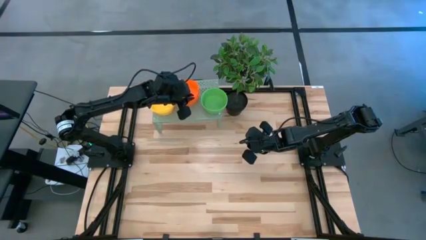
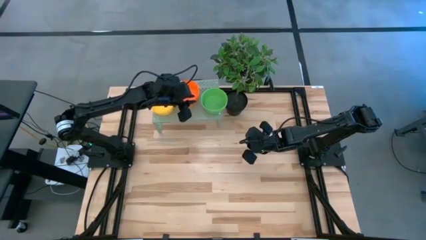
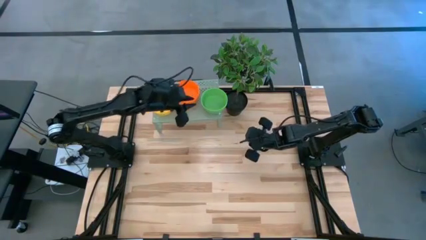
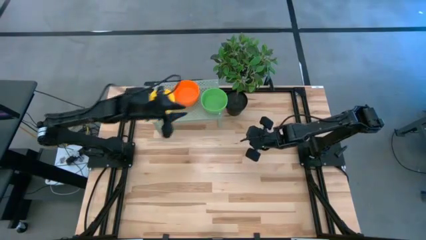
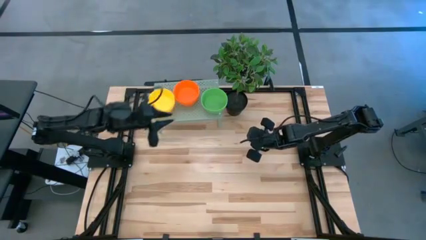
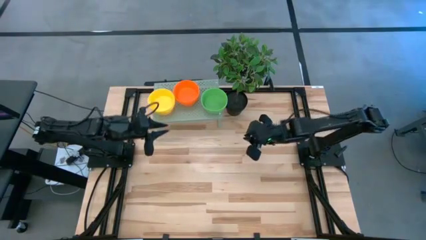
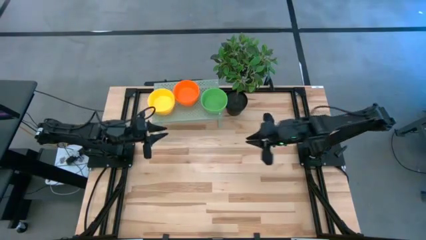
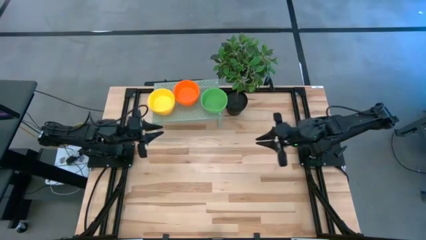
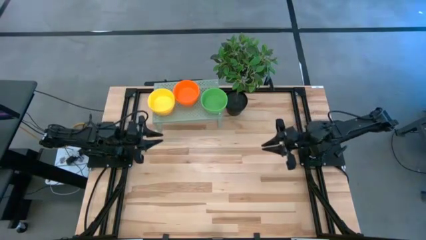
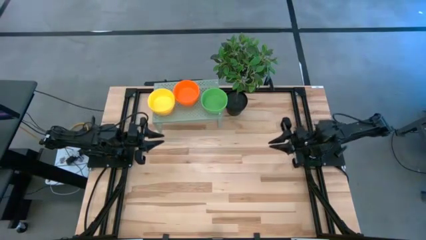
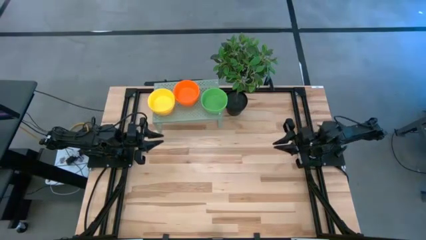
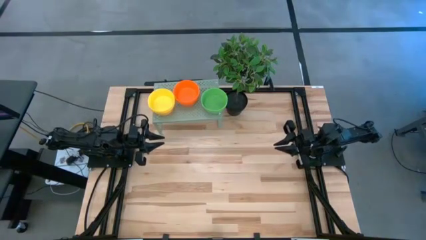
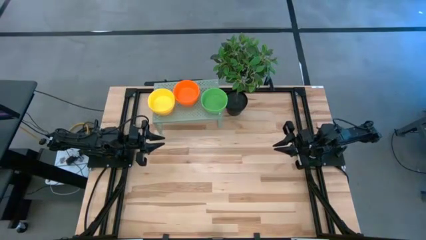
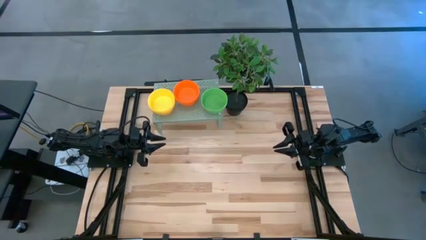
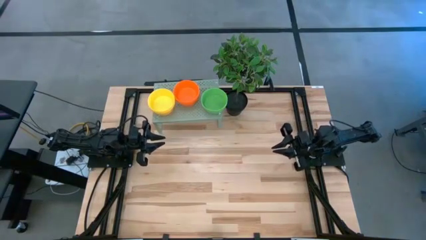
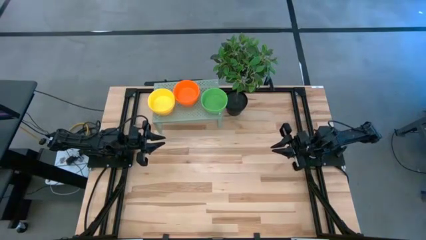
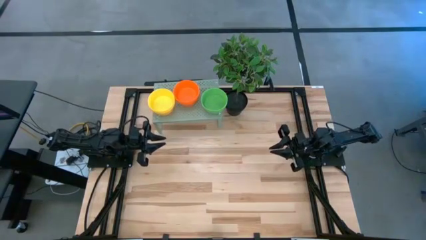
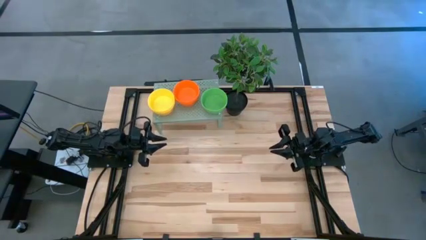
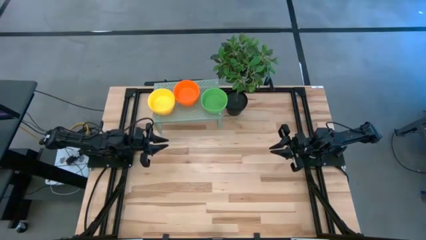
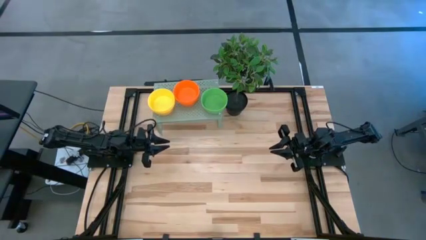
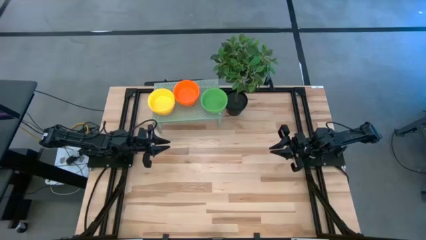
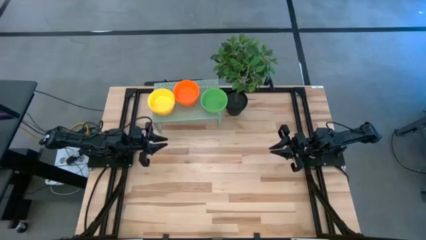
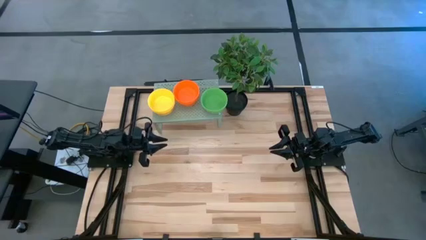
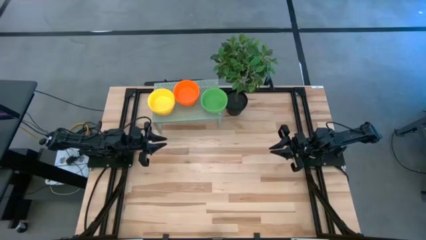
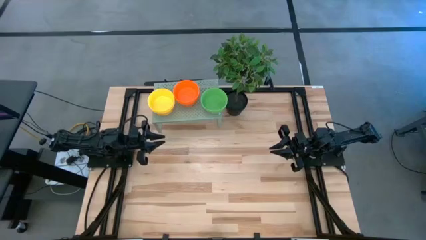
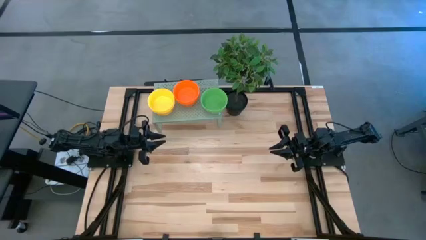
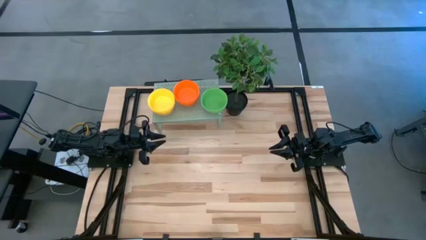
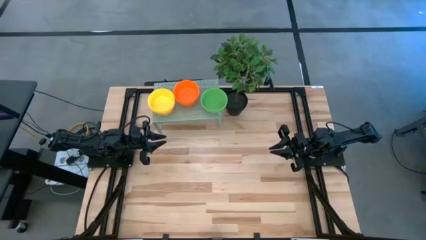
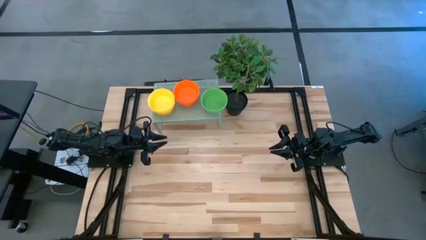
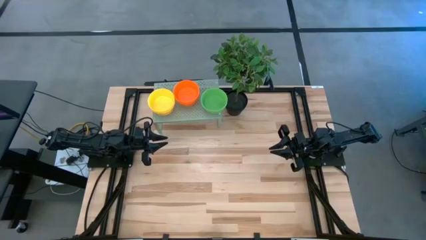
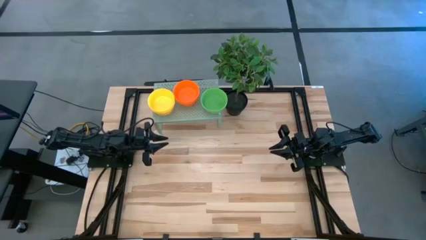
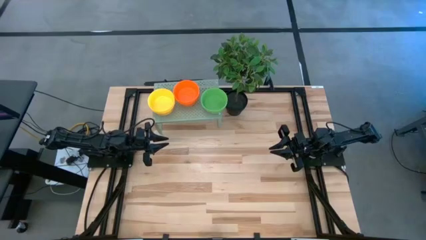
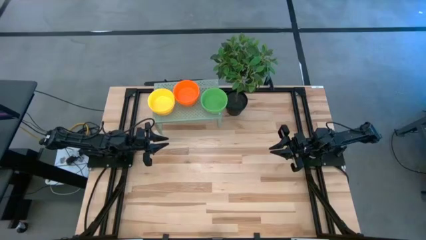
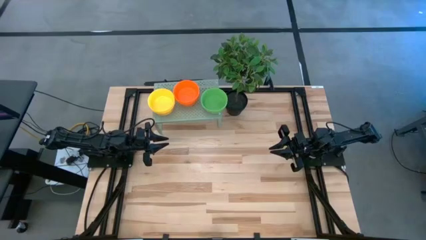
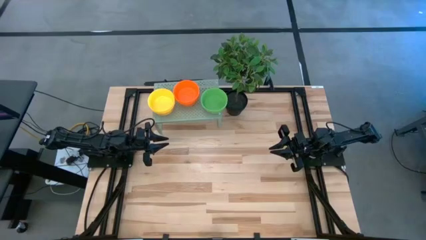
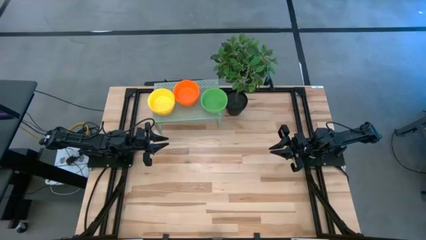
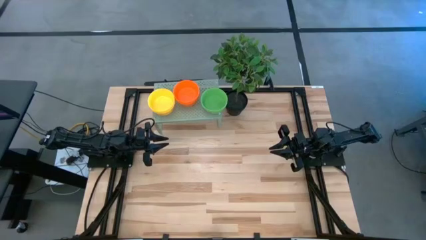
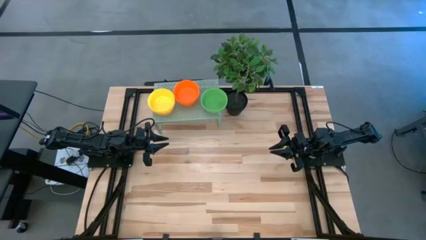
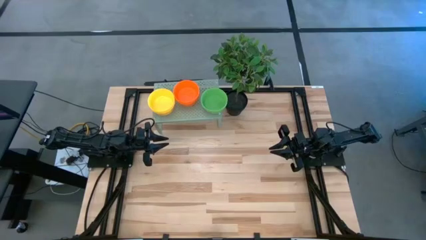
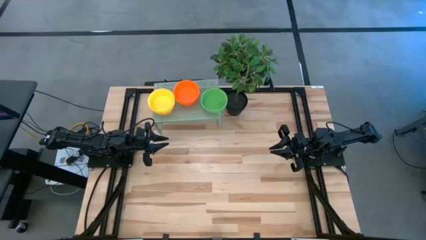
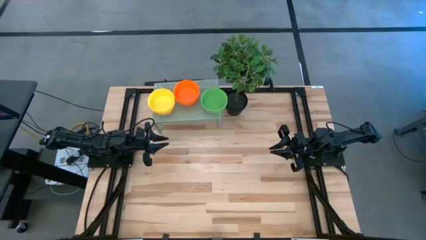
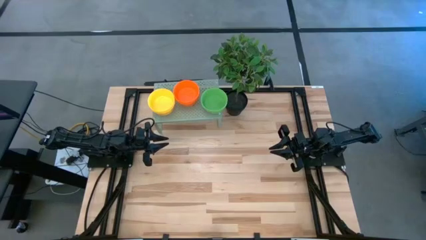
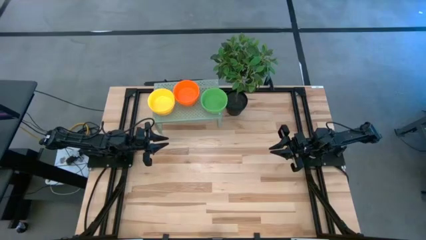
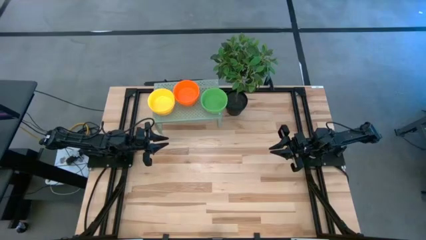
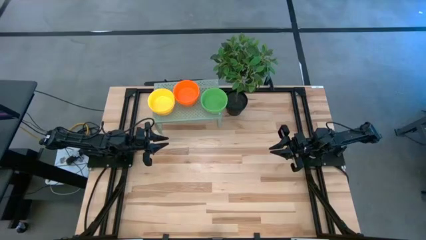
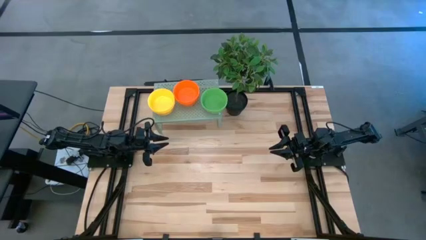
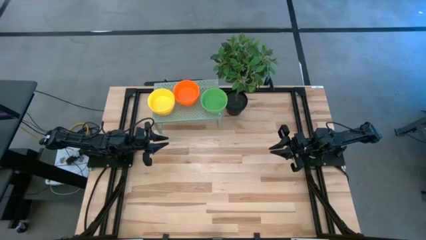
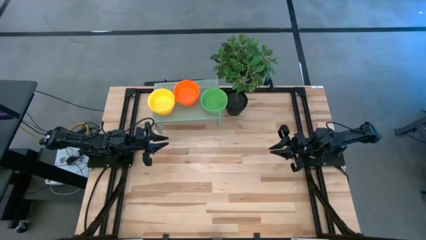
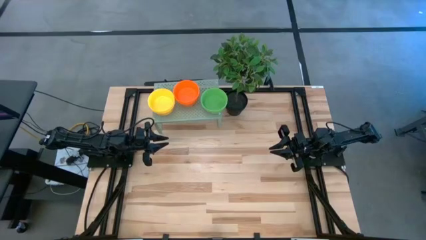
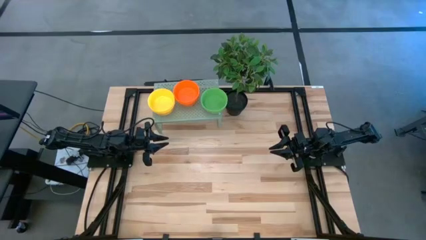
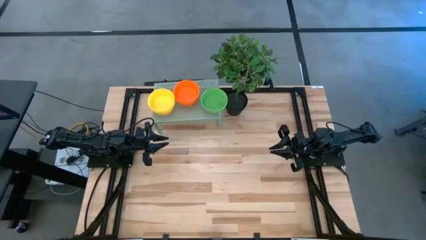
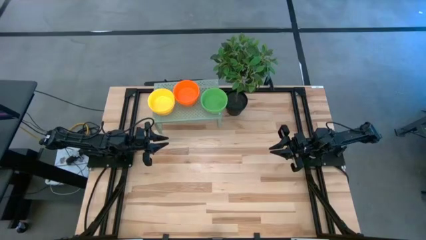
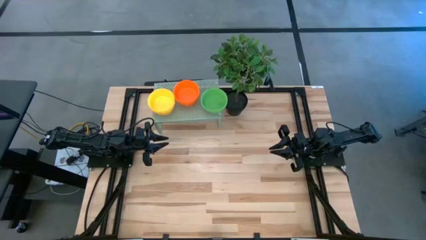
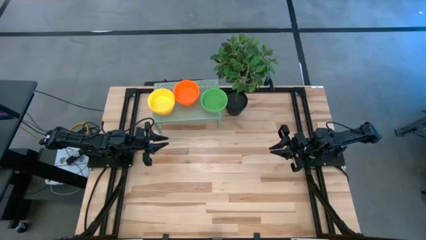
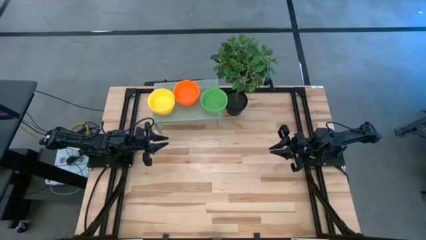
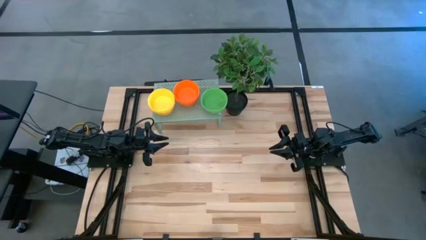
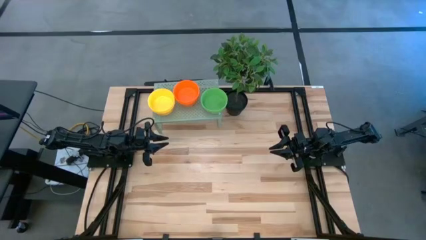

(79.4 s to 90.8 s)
Task: Pick & Place Mini bowls
Return to Home Position

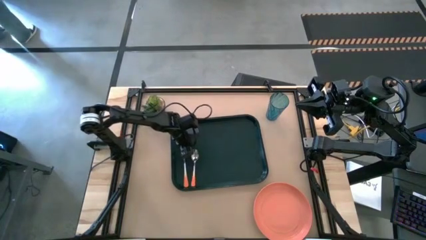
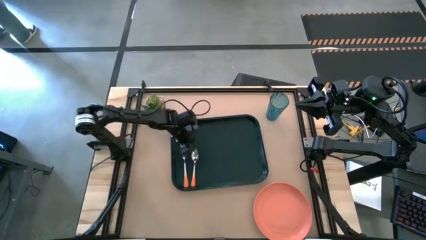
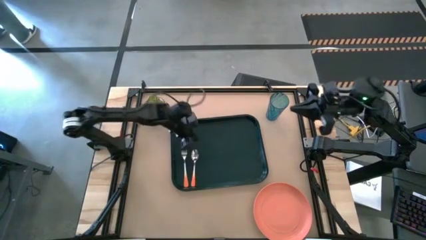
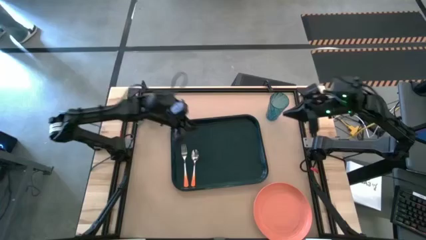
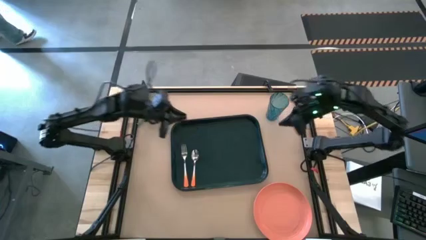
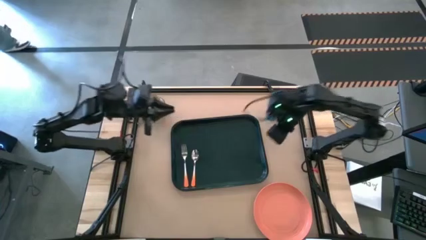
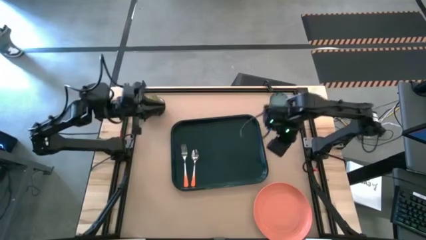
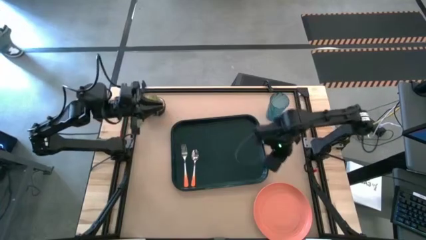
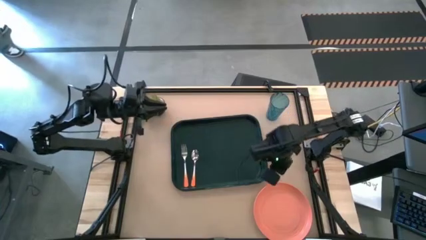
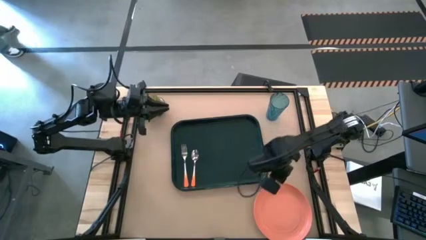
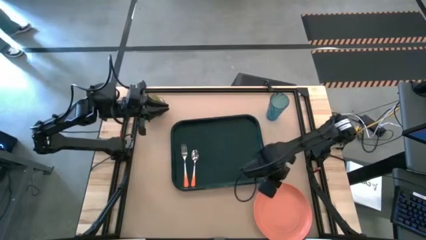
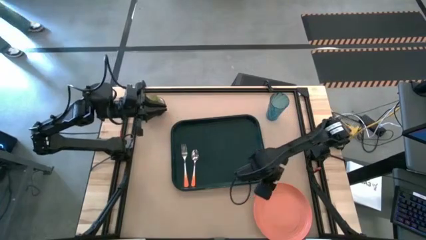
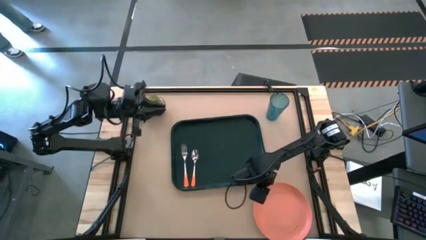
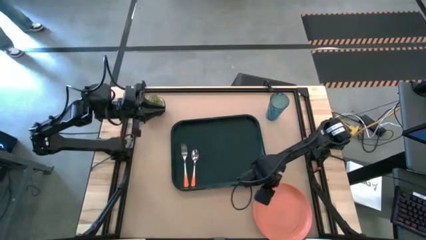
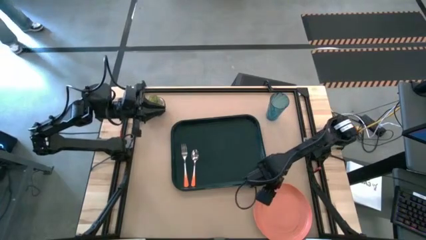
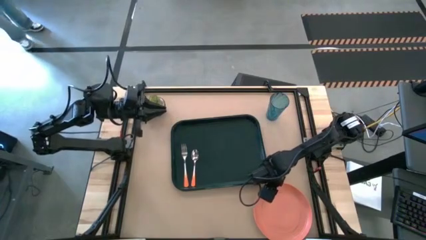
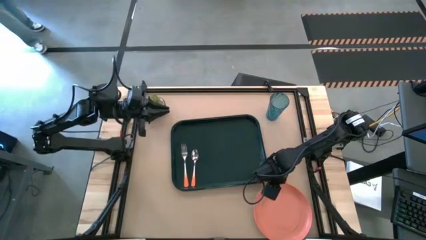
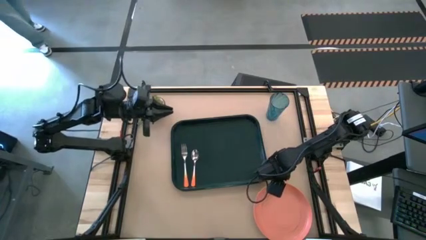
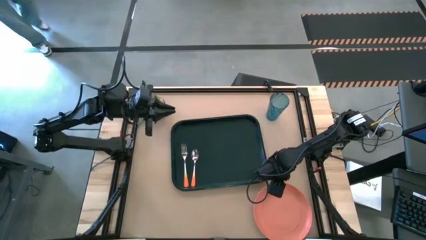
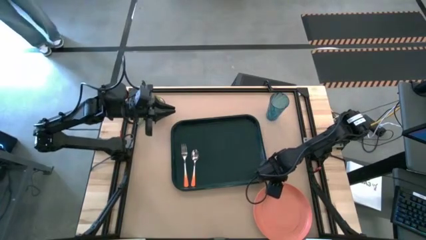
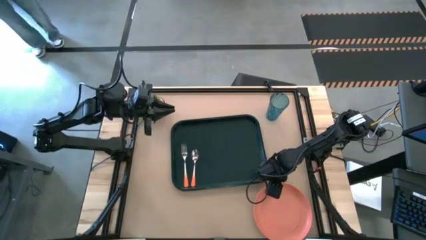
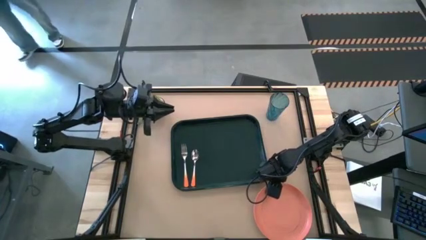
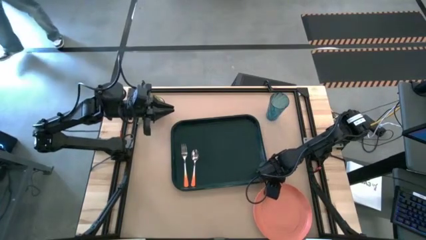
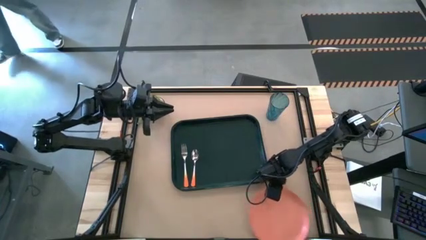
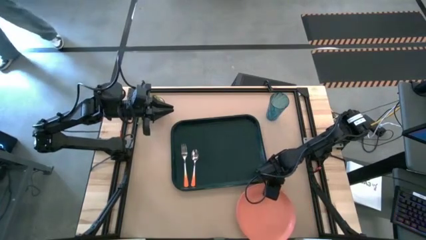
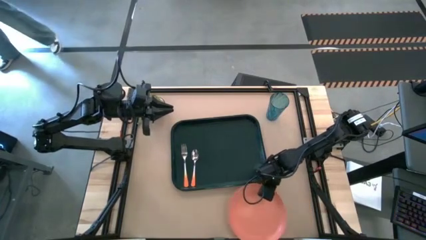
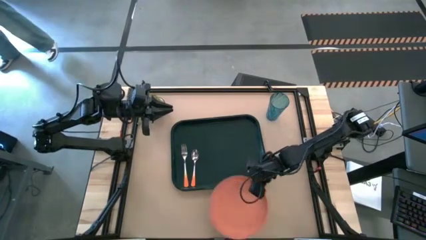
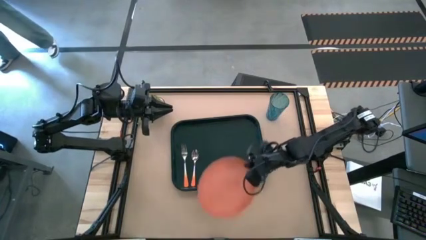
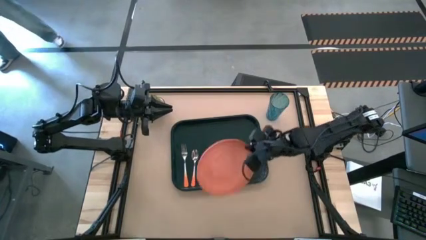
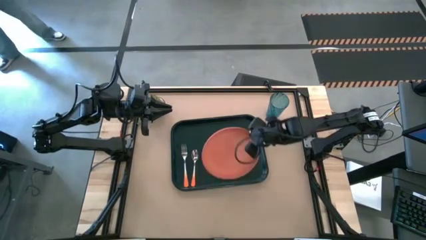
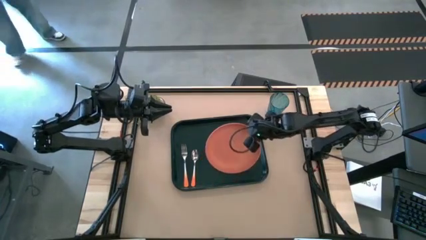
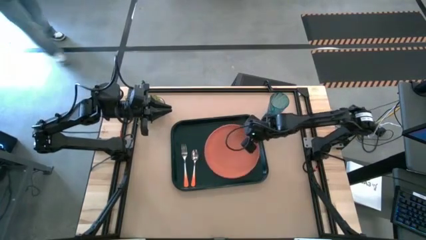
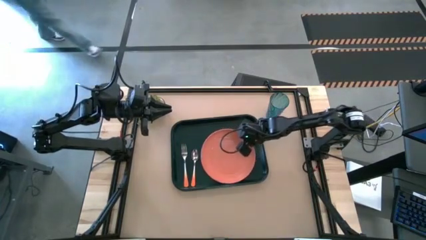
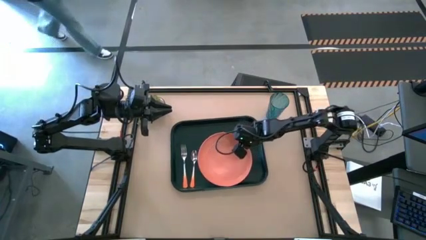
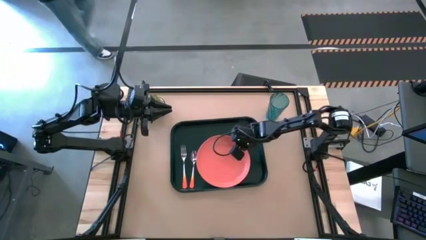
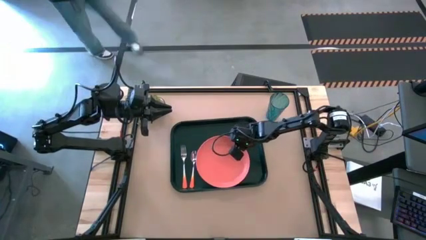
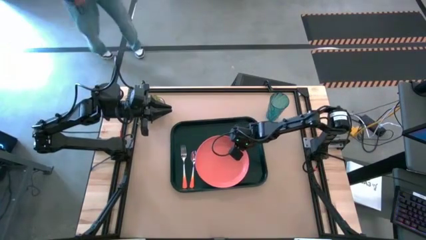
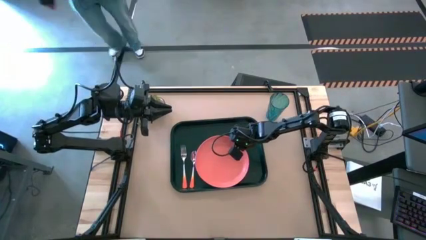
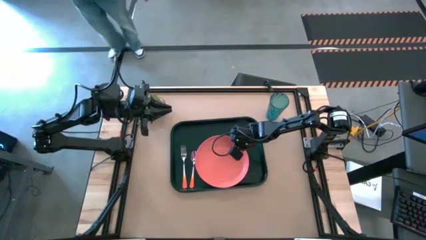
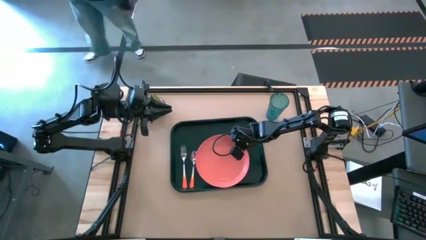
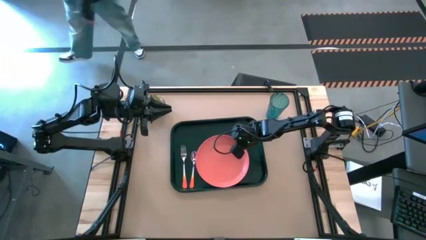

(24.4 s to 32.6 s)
Task: Pick and place plate/cup/fork/spoon on tray
Put the orange plate on the black serving tray to the right of the orange spoon
